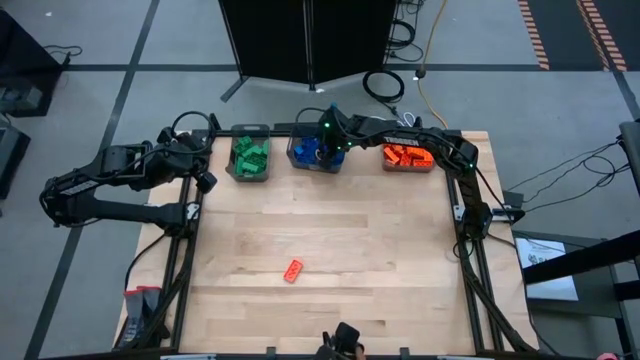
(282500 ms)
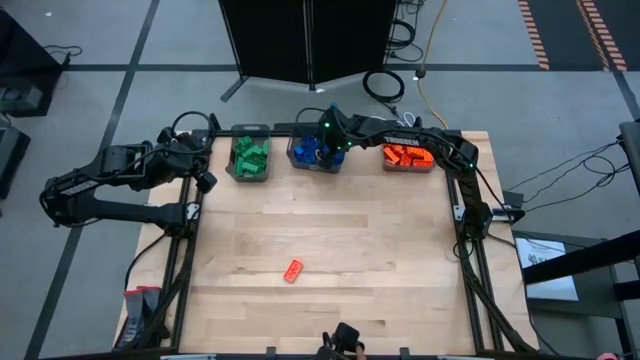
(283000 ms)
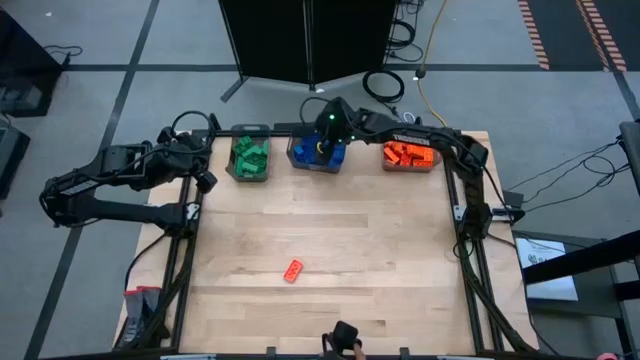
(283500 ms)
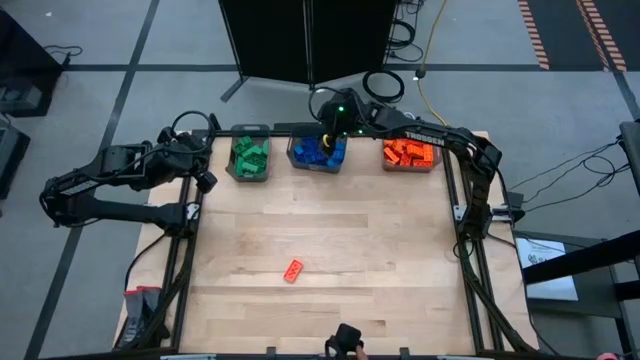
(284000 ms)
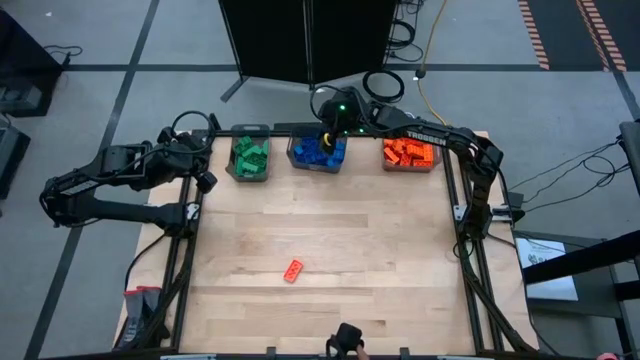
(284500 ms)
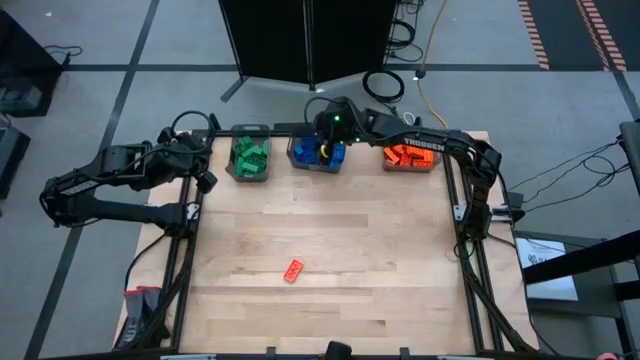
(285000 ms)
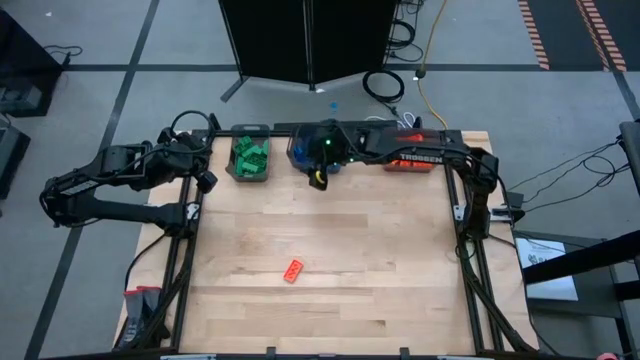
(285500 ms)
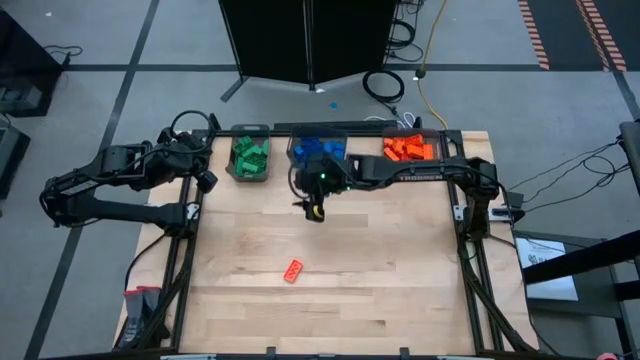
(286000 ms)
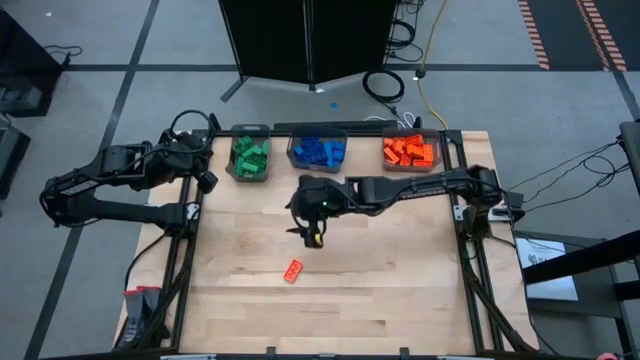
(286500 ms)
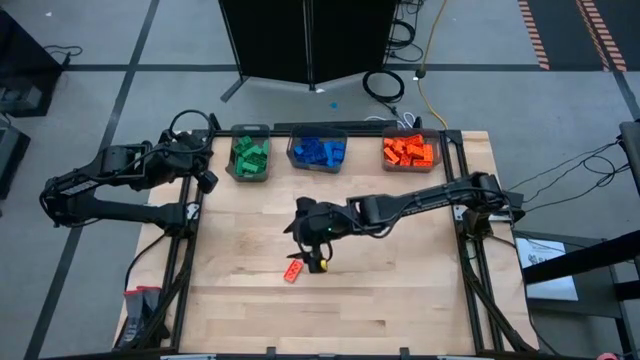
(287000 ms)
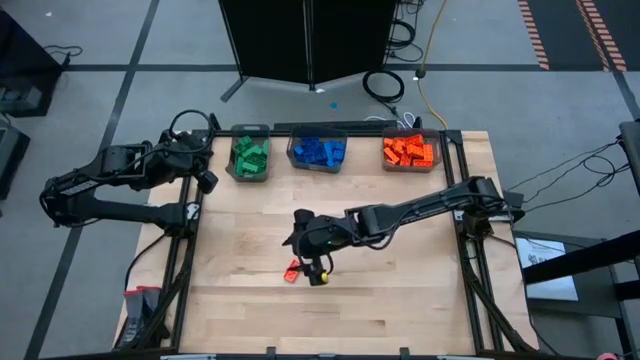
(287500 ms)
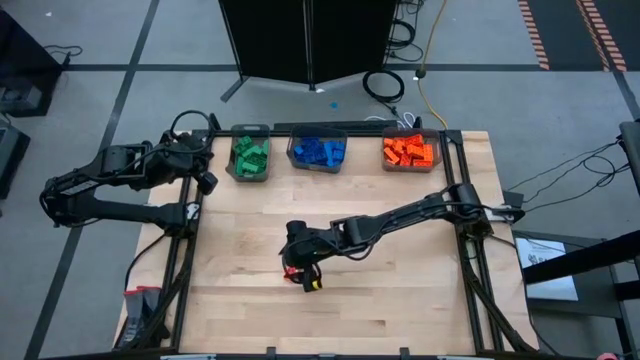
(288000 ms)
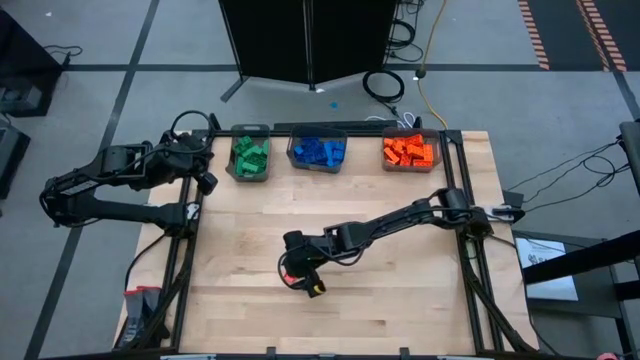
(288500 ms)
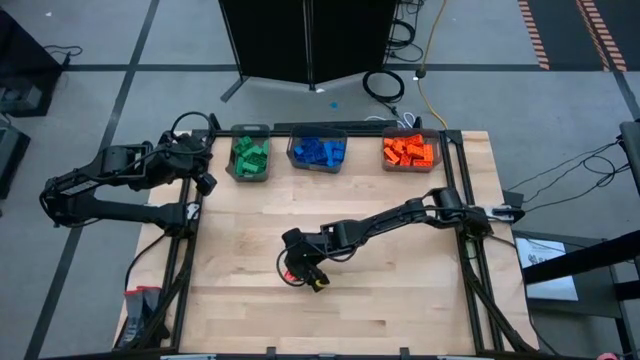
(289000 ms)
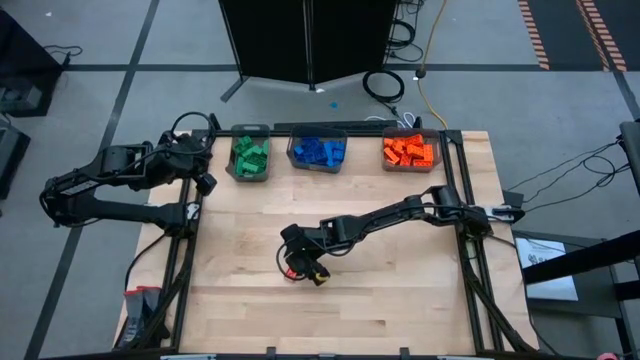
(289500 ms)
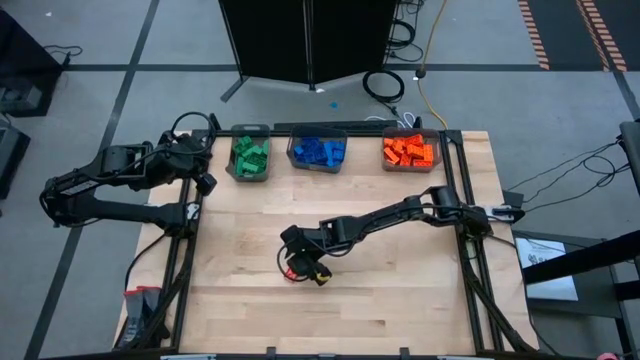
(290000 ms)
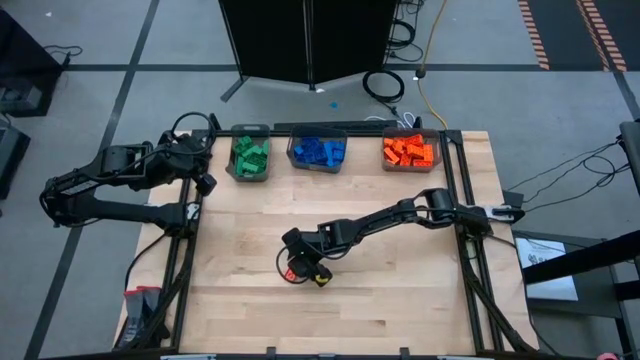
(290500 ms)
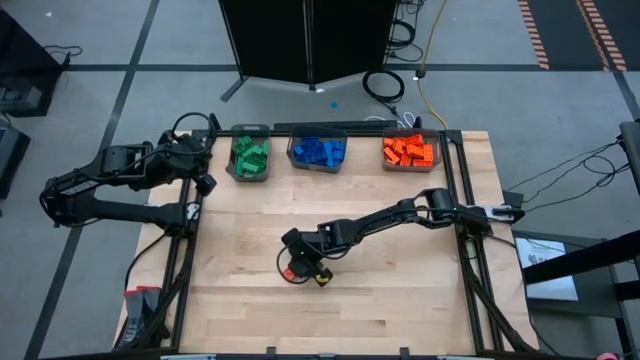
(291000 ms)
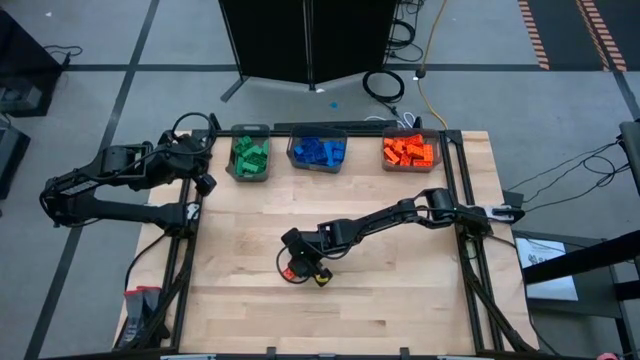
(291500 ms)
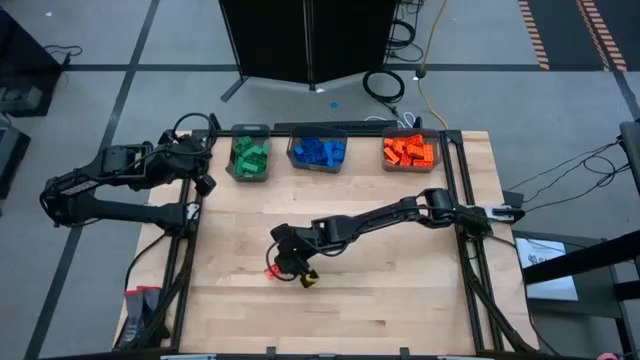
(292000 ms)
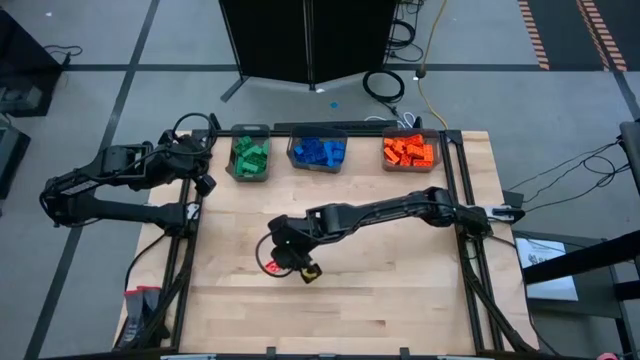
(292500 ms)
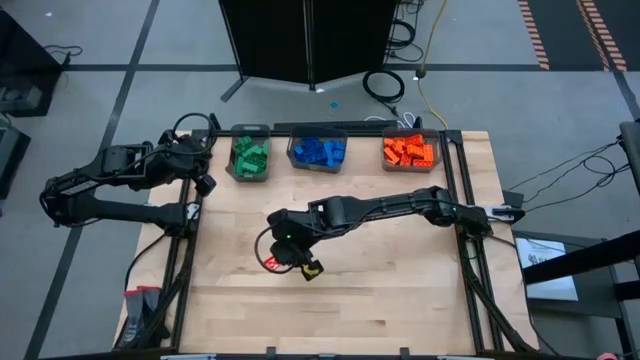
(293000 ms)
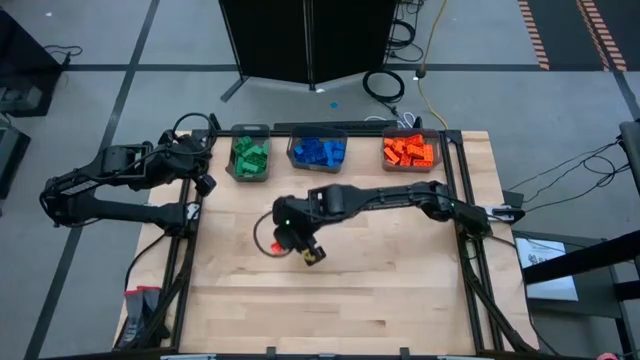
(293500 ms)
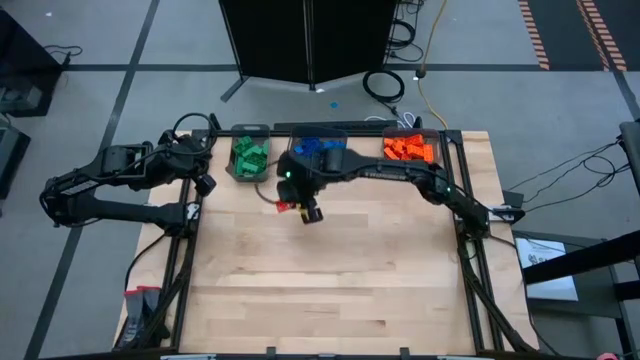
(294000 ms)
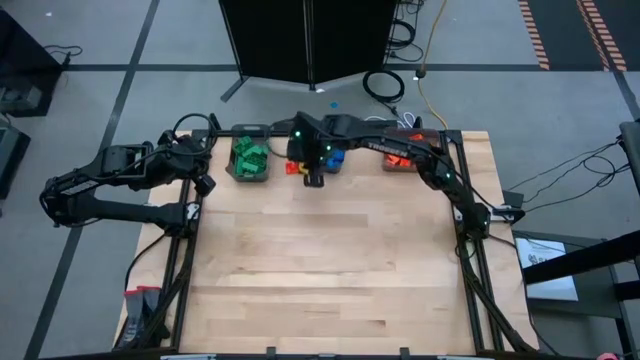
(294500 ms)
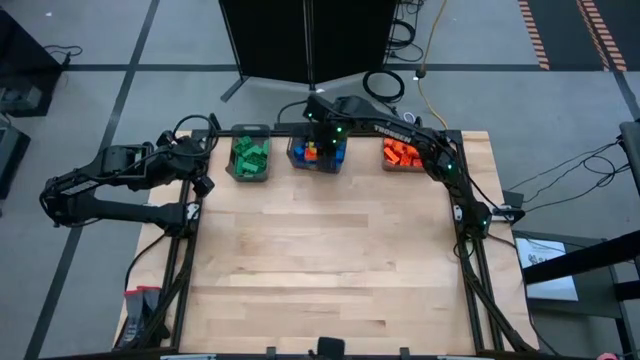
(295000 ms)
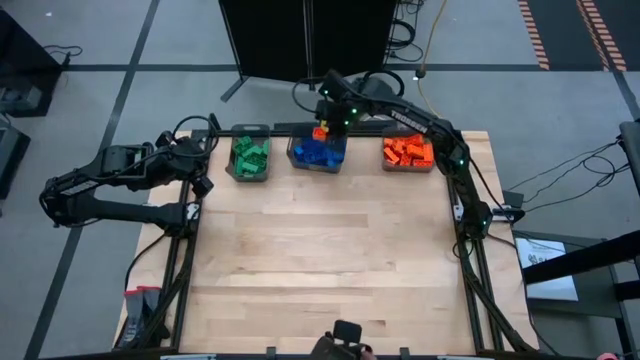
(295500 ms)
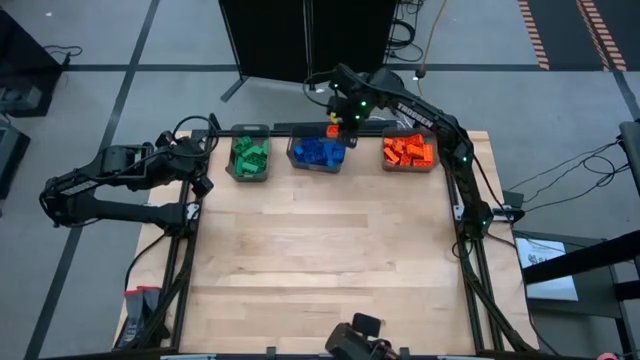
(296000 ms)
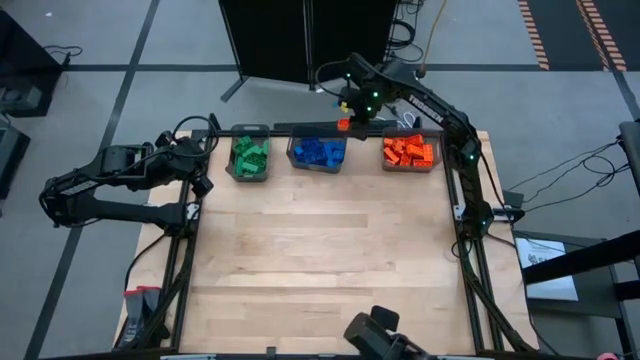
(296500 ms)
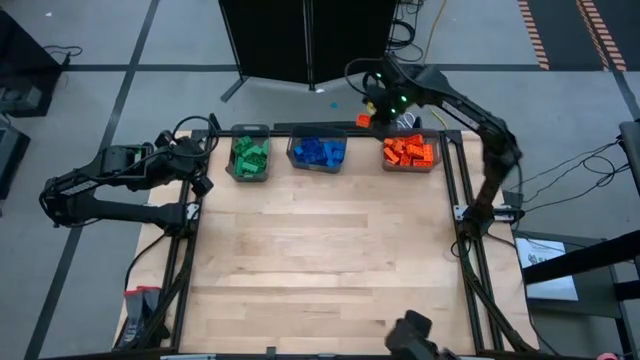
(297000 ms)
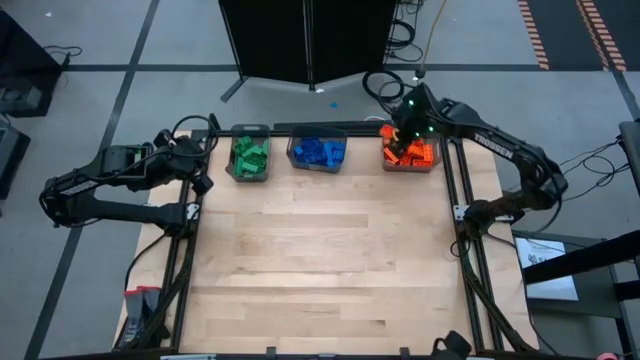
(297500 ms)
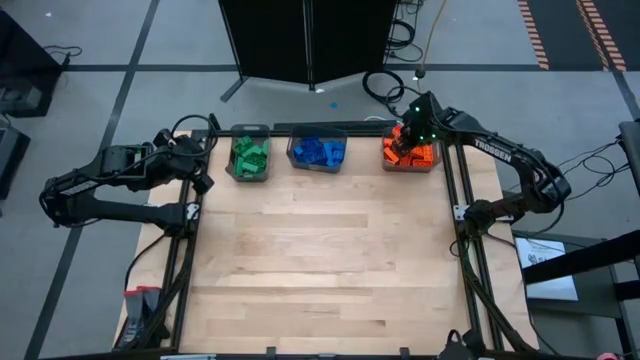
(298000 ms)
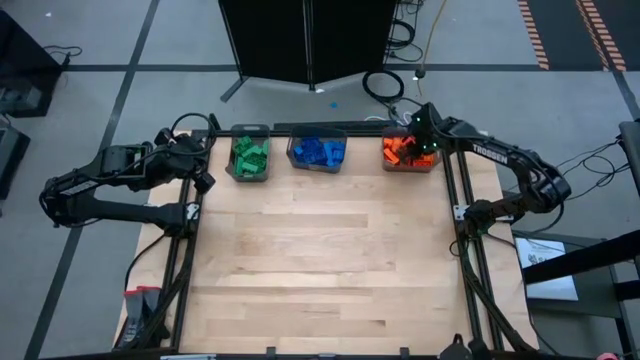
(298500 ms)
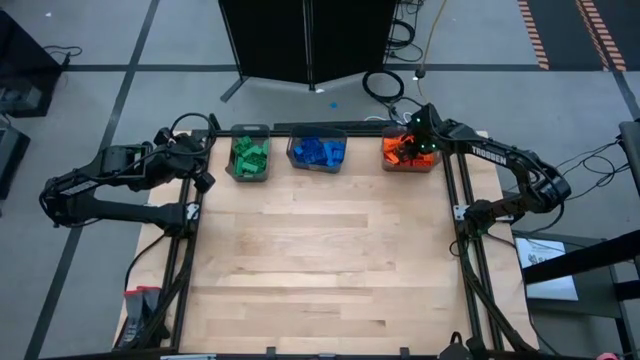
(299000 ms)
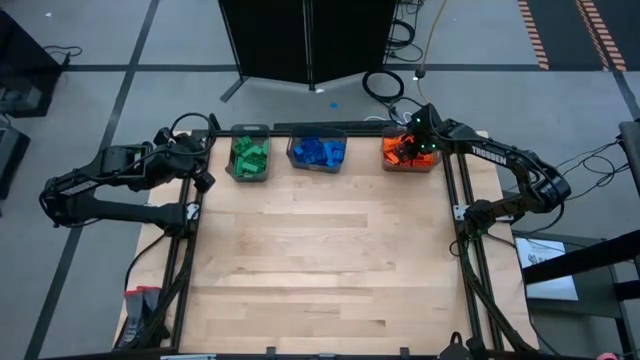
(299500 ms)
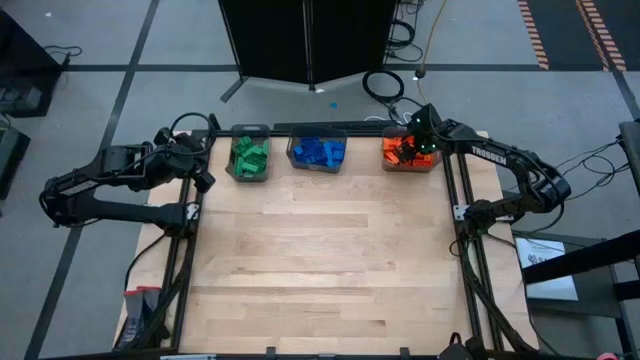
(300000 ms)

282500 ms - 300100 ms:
Task: Sort blocks
Put the orange game piece into the right black bin

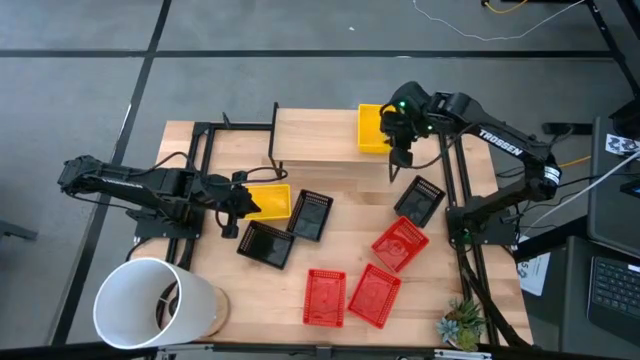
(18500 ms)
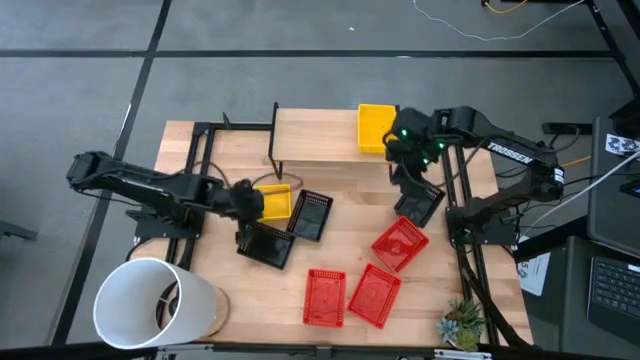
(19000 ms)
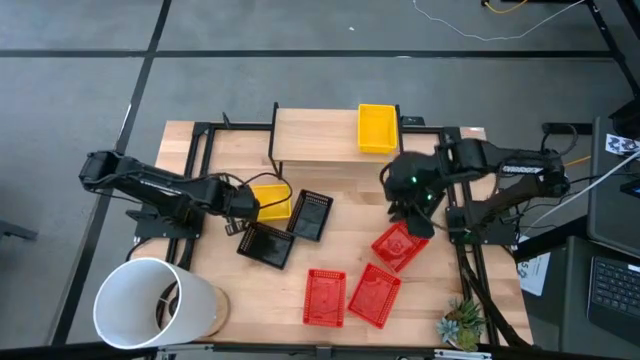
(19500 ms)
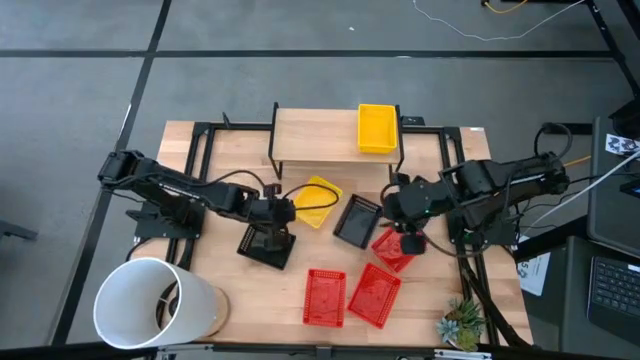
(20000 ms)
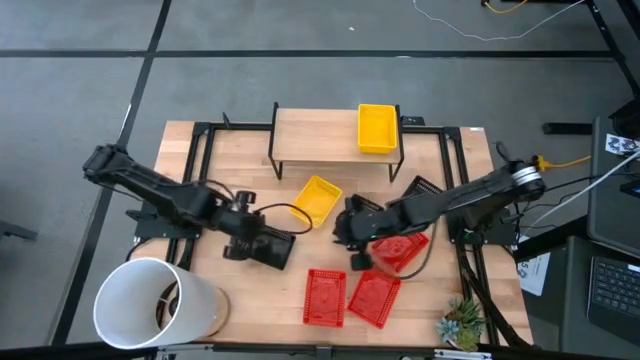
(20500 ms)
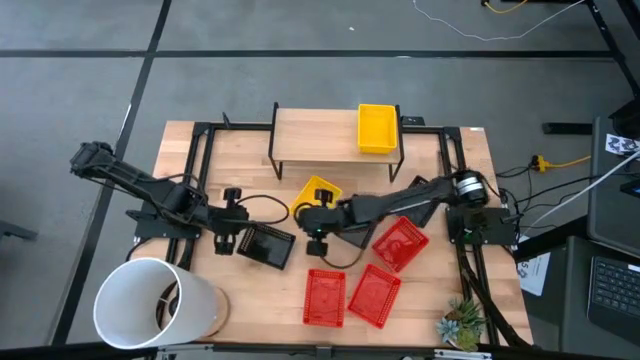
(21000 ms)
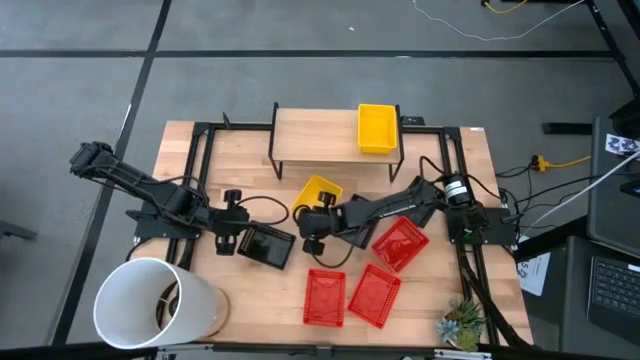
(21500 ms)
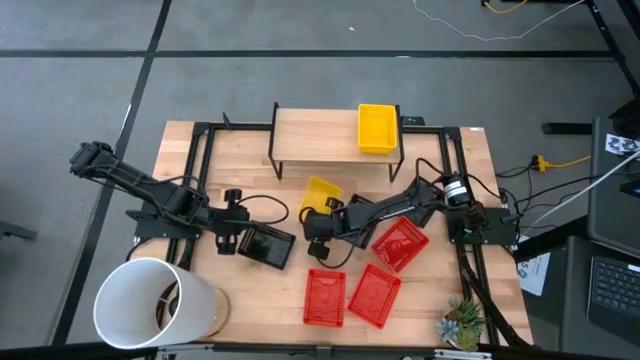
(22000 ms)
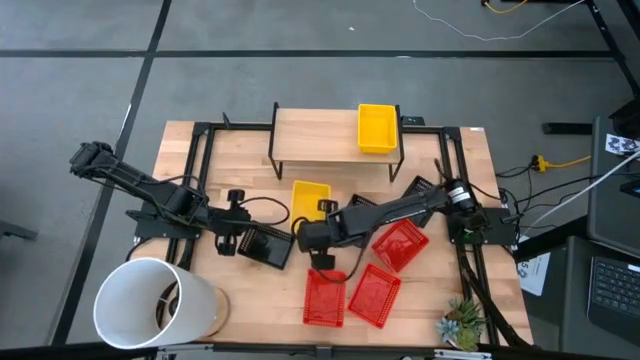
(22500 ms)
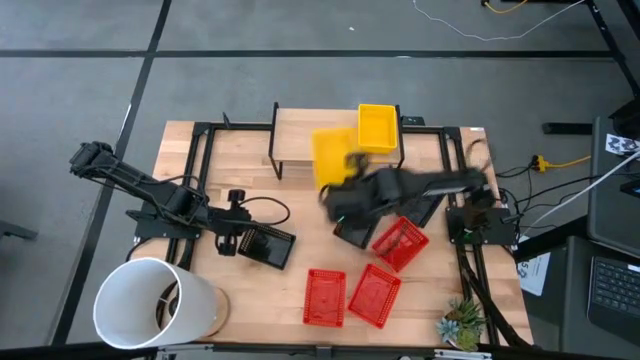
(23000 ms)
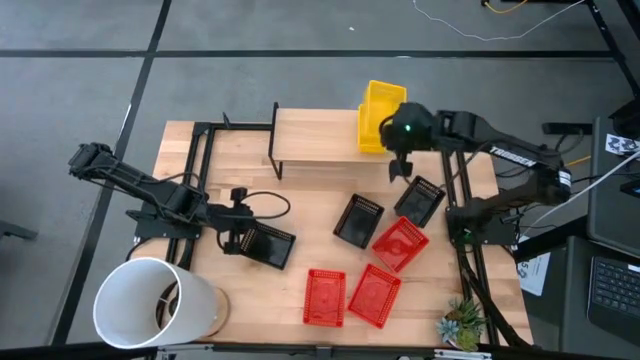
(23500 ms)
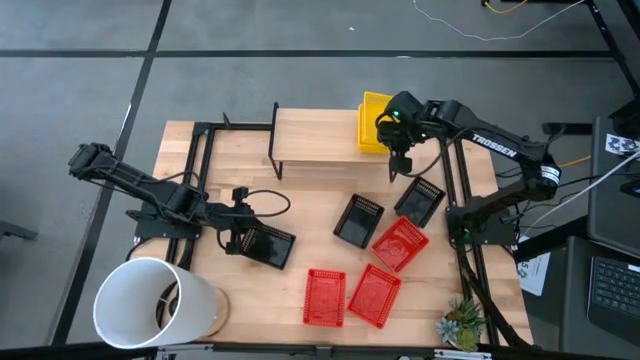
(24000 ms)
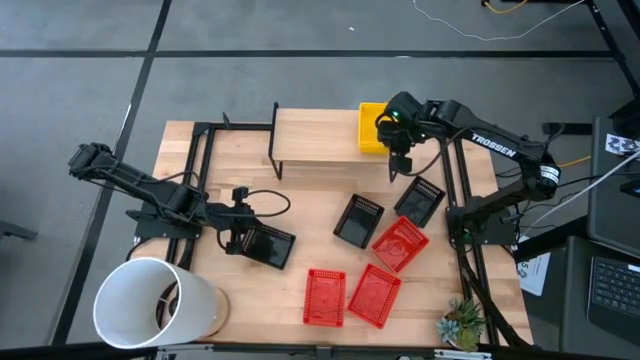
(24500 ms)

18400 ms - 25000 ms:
Task: Stack baskets on shelf by color
Stack the yellow basket on top of the yellow baskets on the shelf
